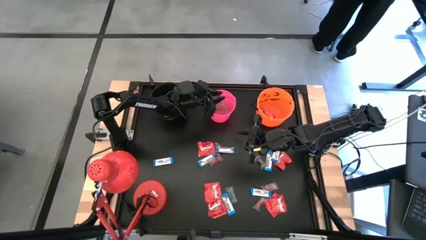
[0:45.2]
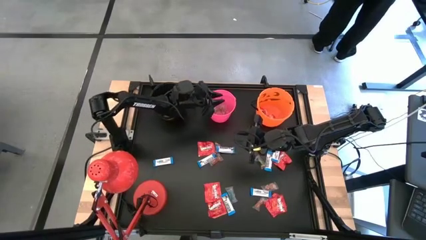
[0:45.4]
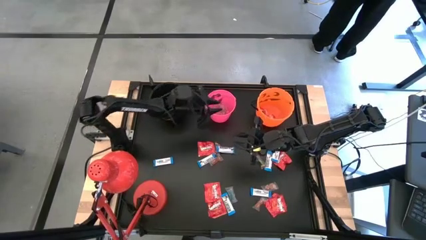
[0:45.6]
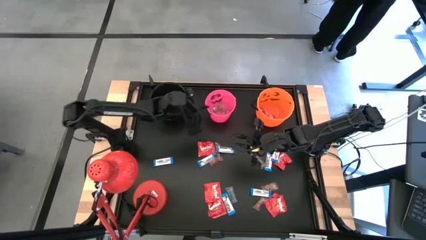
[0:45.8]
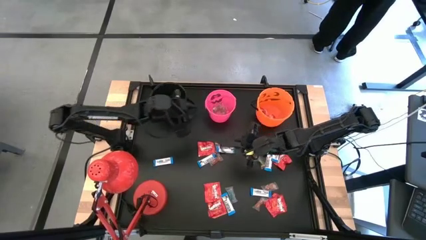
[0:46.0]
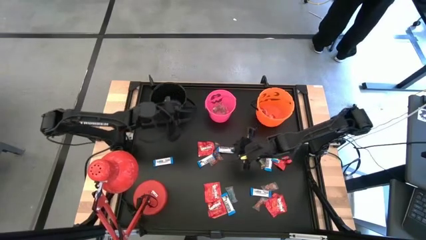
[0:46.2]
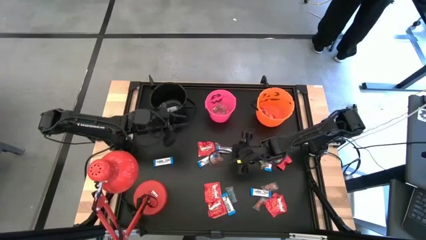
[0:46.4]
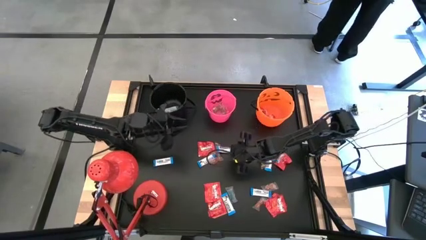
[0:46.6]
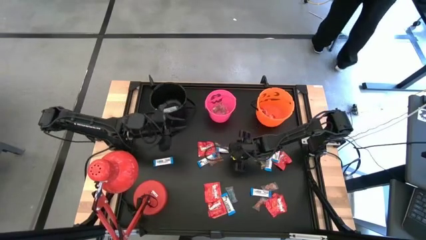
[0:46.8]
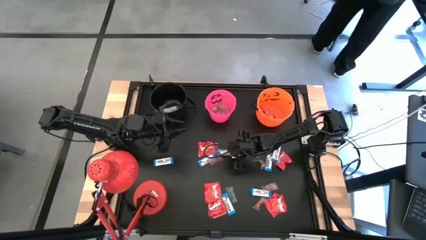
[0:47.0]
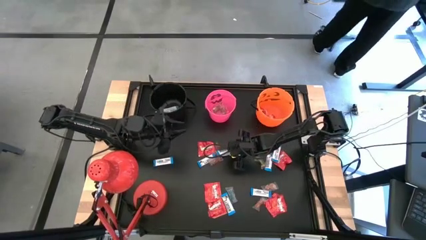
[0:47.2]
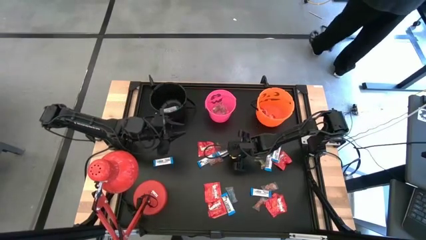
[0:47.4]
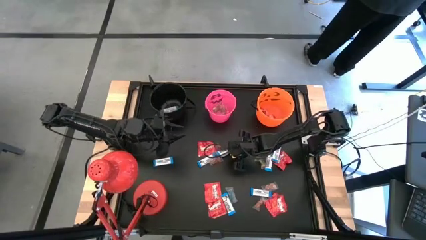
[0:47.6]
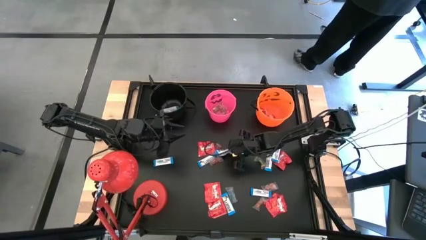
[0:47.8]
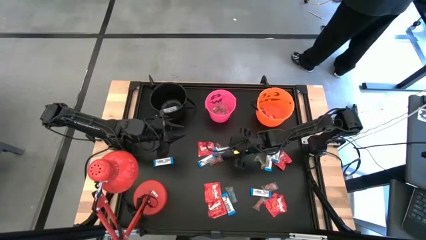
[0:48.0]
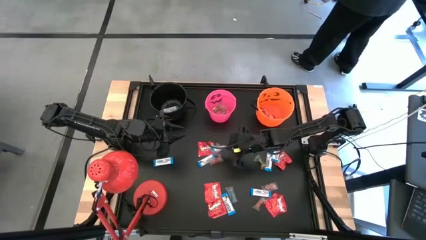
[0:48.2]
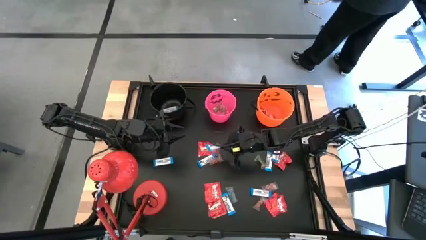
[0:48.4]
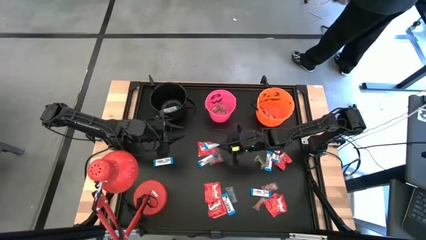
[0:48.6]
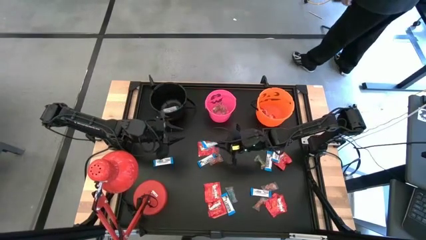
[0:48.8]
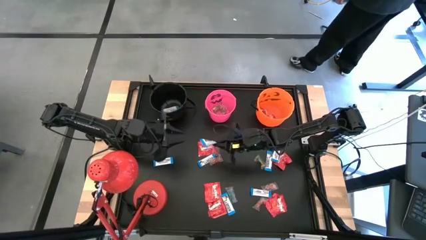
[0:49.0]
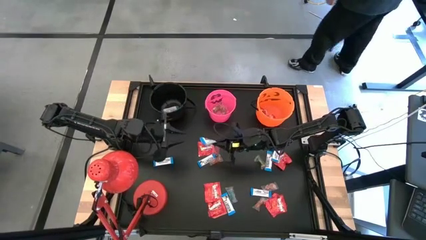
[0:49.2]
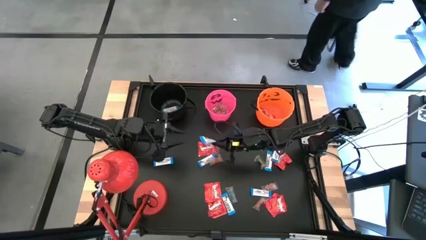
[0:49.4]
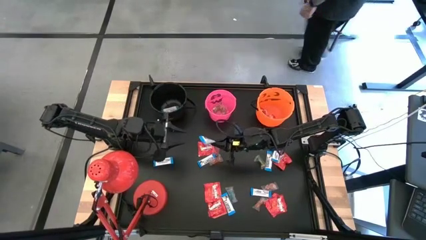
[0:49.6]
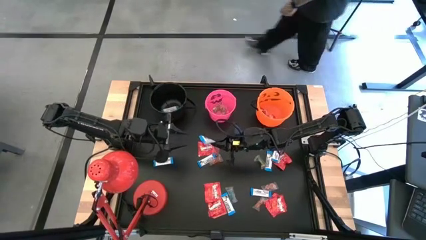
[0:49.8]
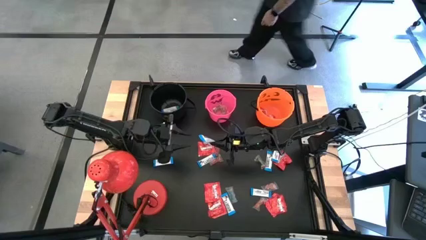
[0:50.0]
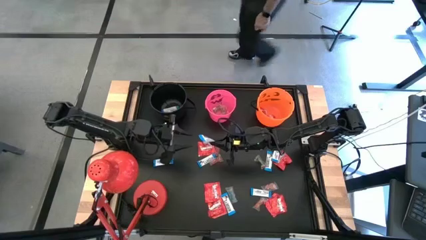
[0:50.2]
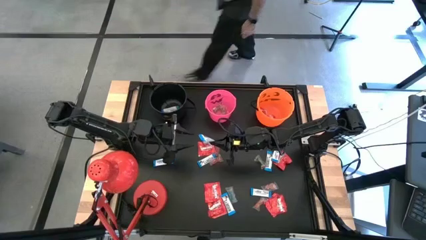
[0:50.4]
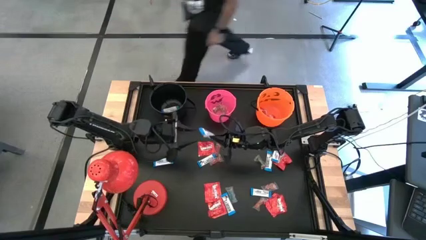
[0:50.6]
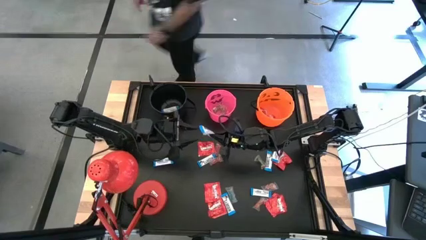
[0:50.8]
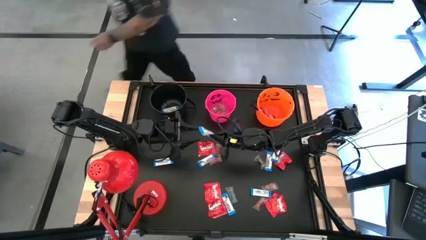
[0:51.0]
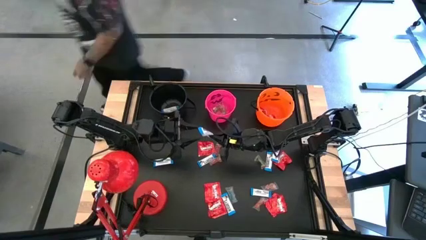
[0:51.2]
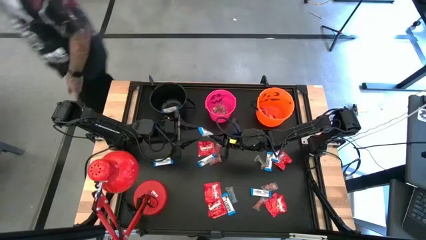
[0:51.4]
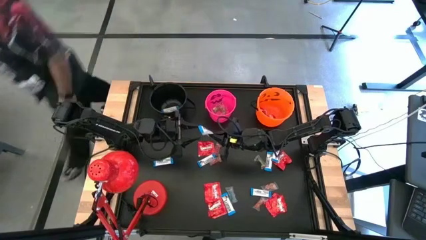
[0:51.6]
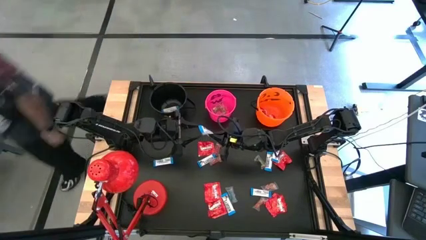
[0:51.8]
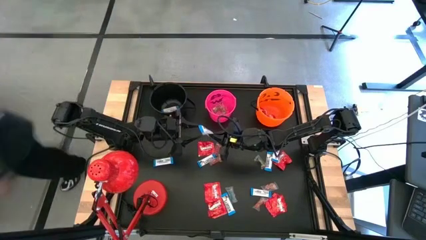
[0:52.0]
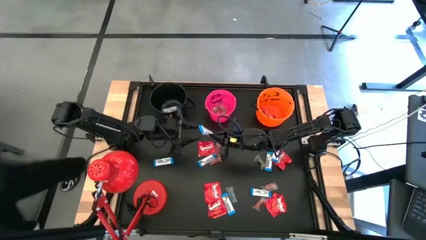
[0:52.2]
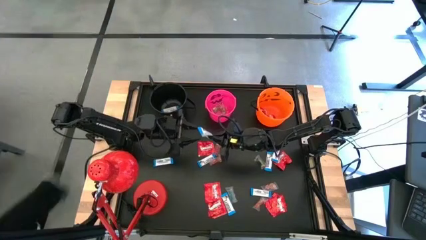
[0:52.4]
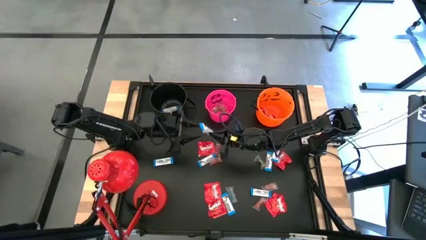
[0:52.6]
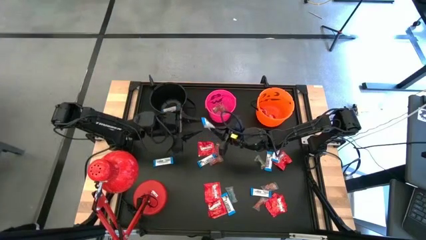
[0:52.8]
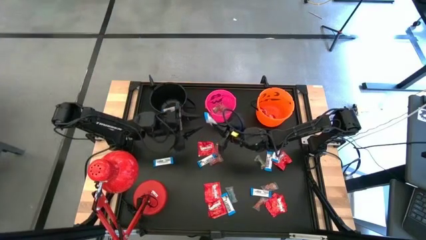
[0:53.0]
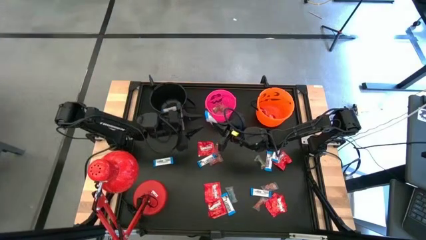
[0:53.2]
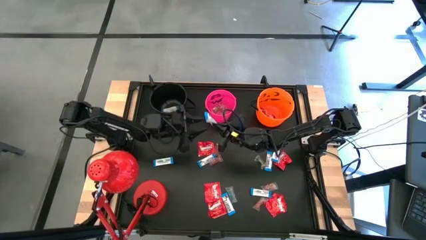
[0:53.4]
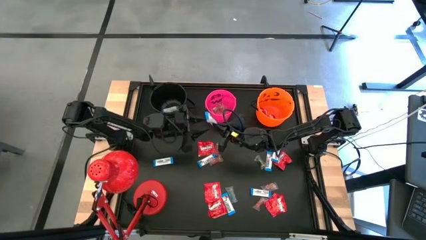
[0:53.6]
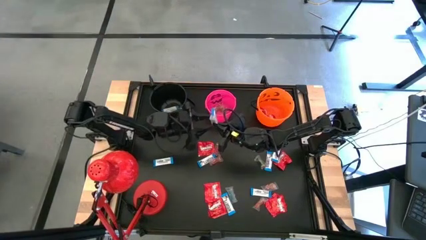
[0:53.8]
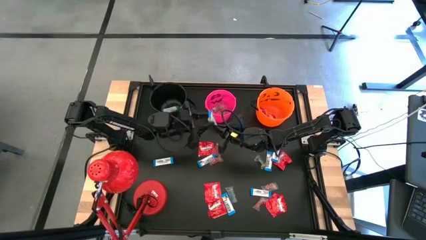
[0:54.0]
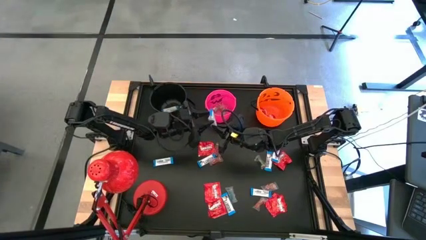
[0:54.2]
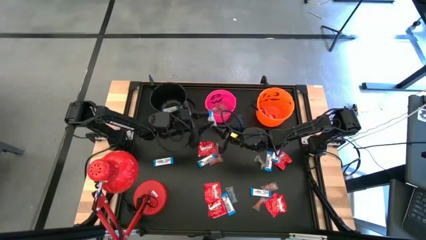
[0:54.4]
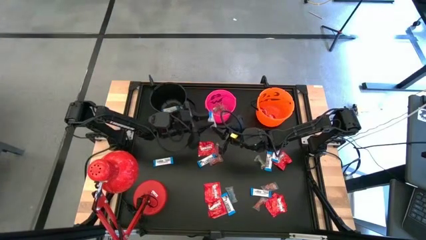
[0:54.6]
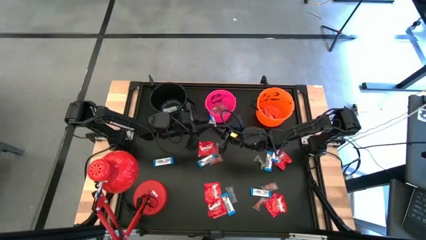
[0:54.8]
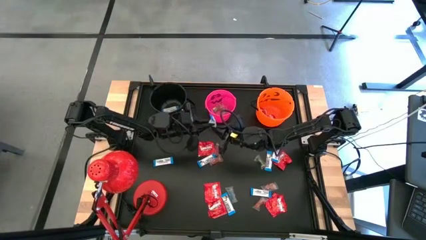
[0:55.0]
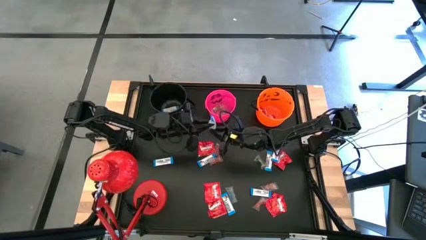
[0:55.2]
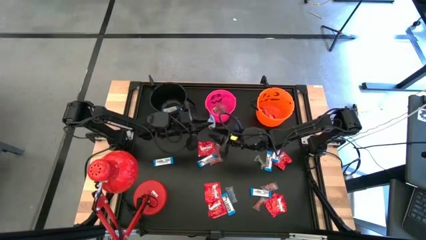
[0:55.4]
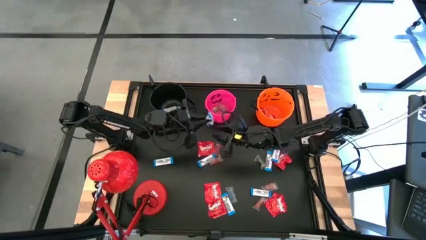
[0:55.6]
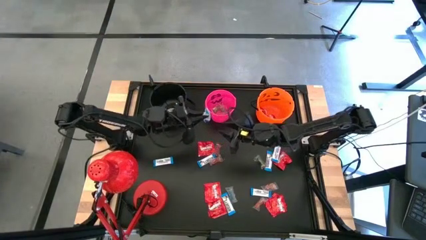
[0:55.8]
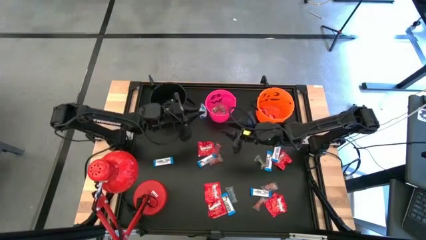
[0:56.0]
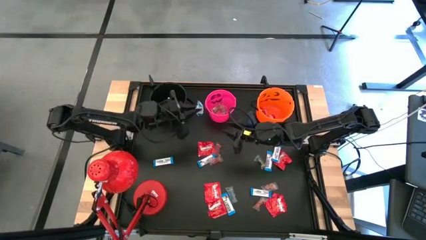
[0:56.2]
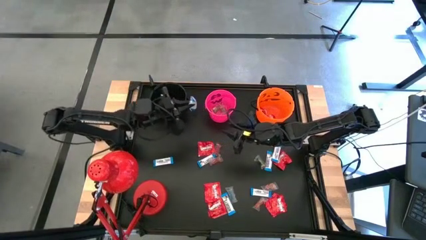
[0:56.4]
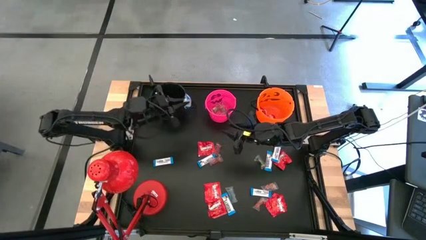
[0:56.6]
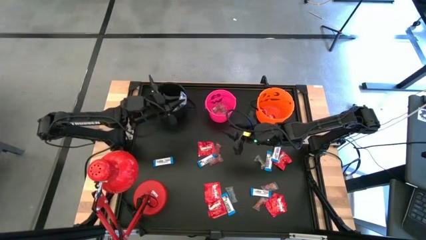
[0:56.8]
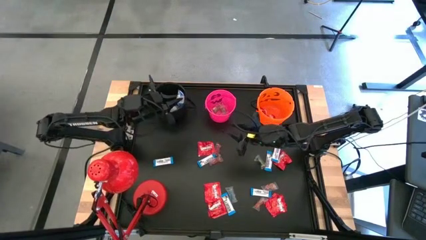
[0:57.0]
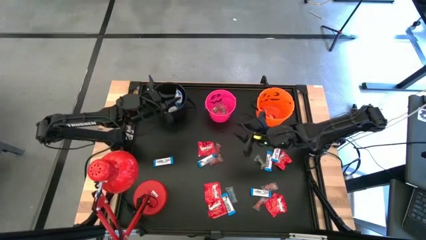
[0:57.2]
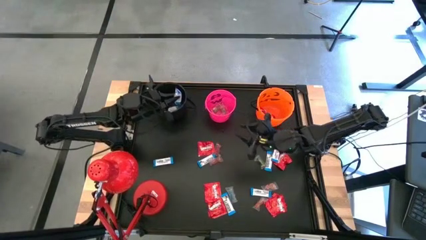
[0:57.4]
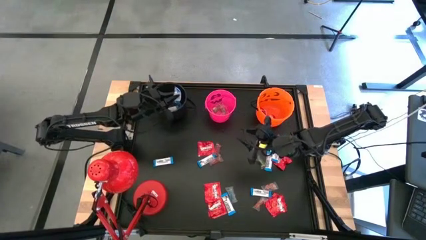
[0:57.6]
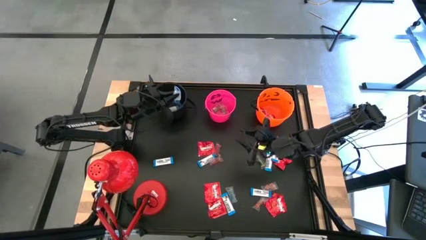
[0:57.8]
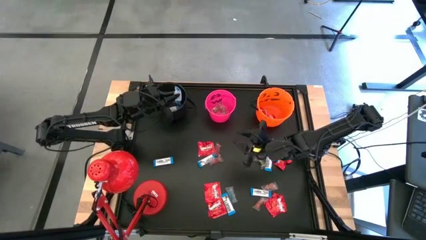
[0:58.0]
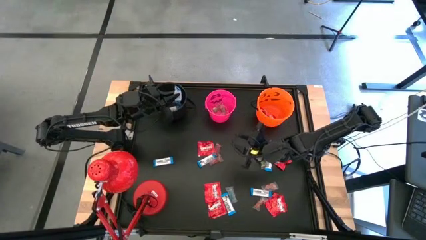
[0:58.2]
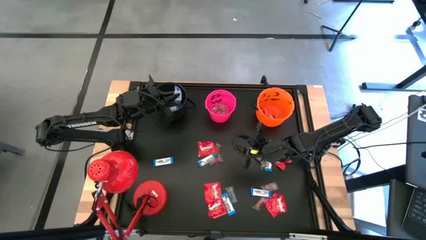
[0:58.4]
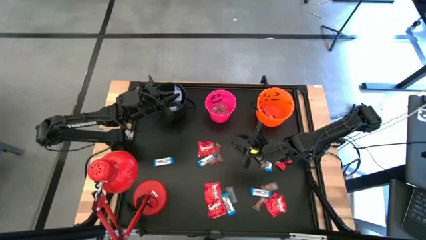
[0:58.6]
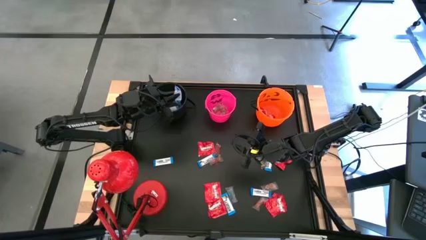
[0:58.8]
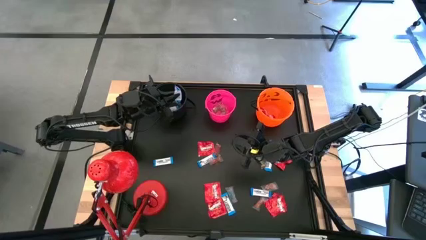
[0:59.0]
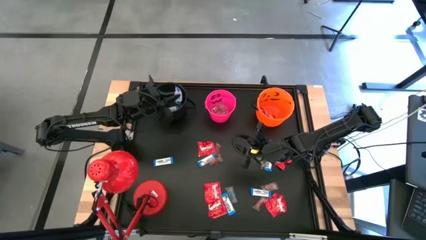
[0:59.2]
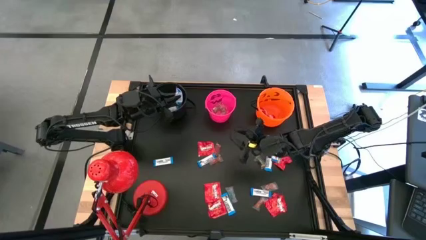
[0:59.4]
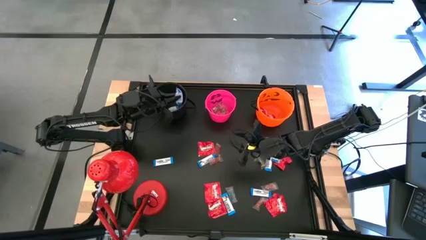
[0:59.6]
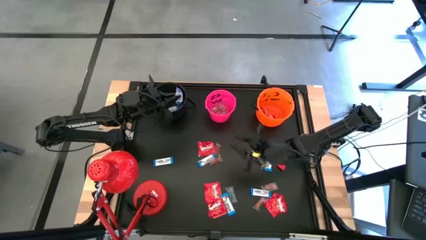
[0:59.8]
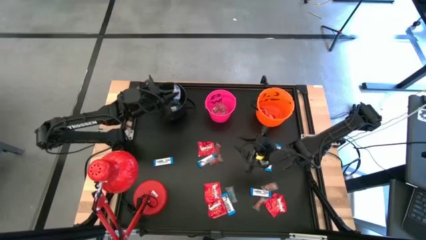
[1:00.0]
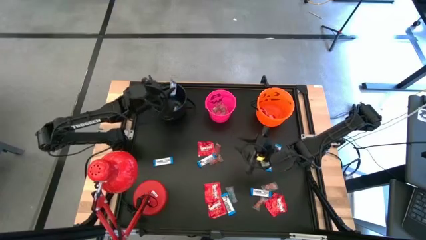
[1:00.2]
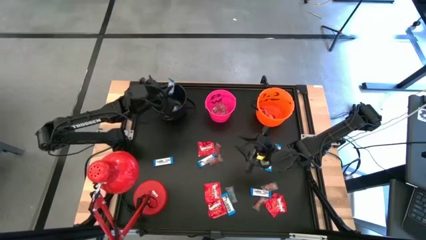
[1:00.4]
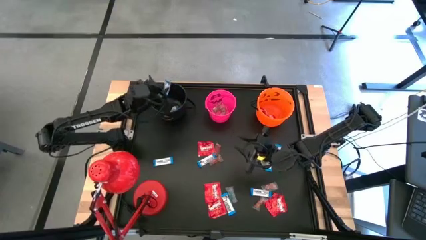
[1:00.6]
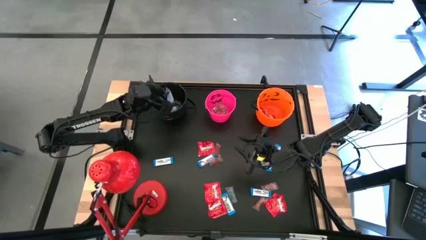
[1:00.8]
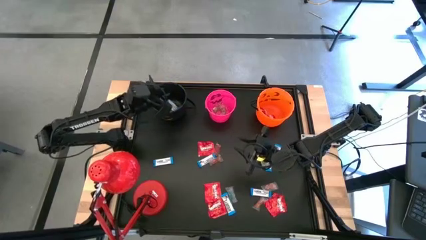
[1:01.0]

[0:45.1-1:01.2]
Task: Organize candy in baskets
Put the white chocolate bar into the black bucket

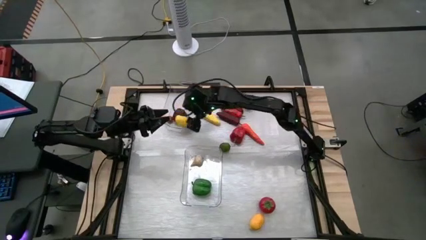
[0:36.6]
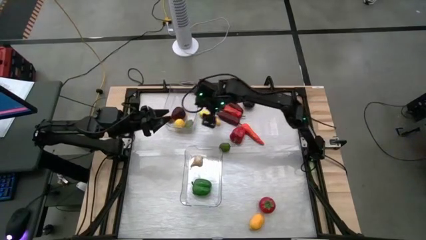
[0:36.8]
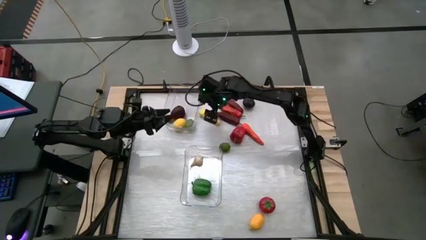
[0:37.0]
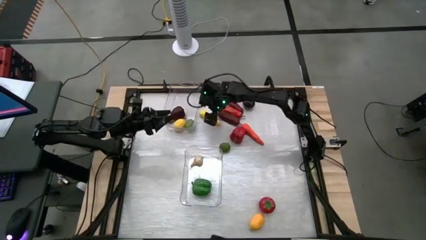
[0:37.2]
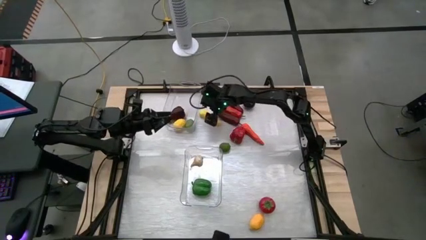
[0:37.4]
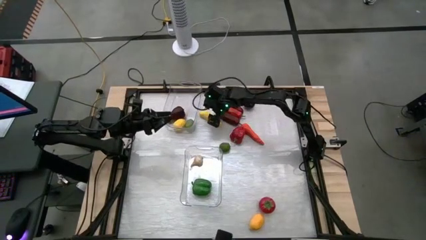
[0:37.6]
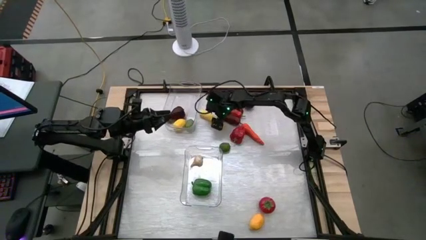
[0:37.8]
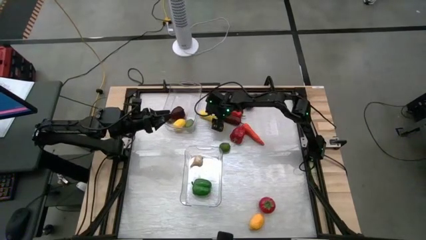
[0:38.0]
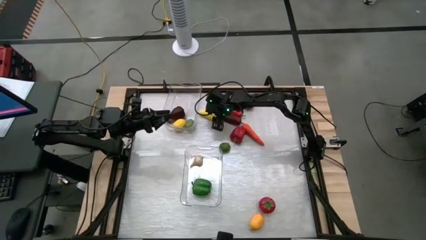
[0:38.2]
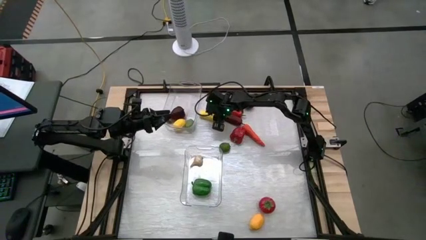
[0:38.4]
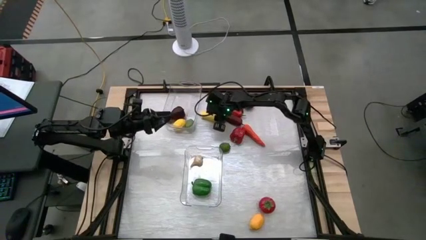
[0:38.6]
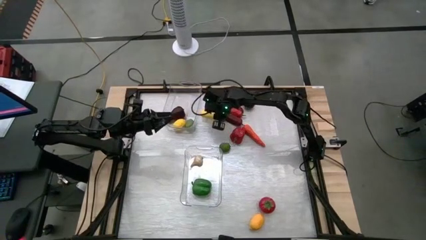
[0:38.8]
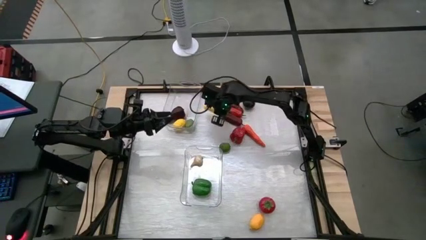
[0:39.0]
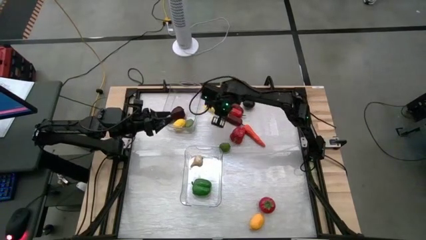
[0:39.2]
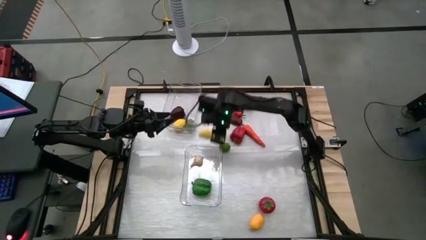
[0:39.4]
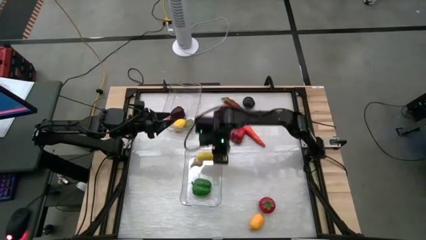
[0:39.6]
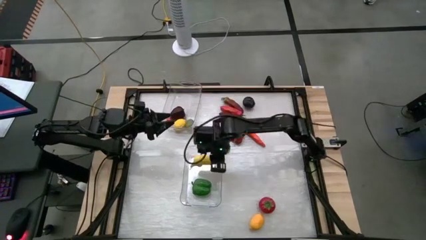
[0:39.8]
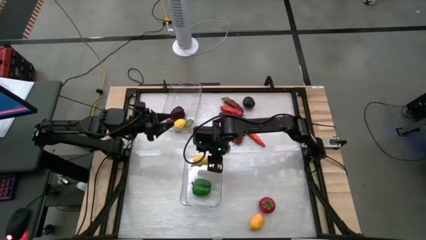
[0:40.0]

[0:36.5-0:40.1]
Task: Sort produce into baskets
Put the yellow corn into the bottom transparent bin
